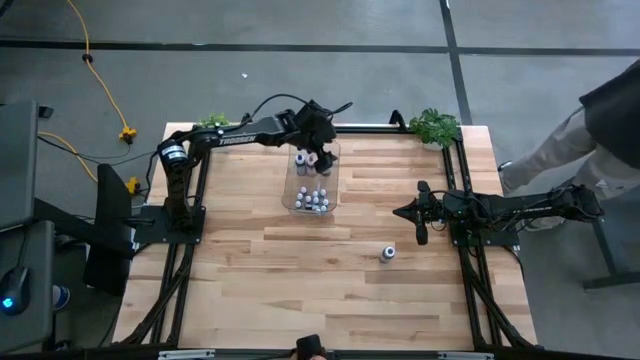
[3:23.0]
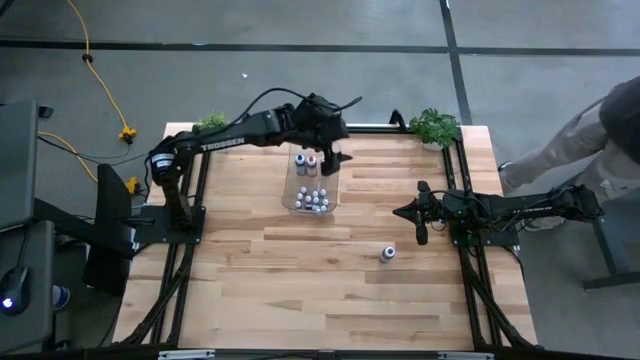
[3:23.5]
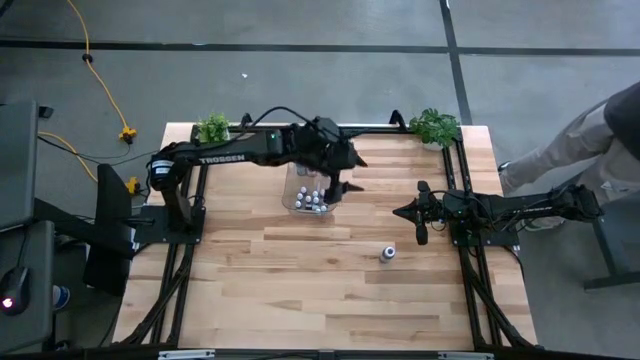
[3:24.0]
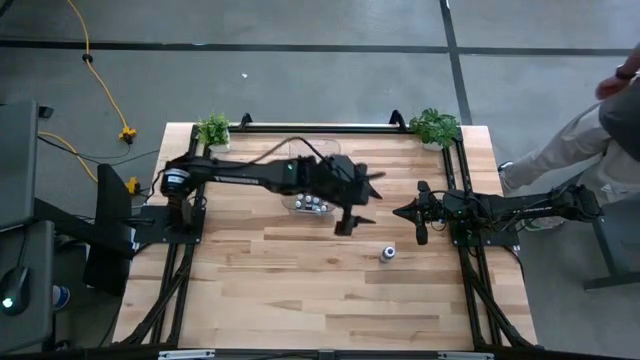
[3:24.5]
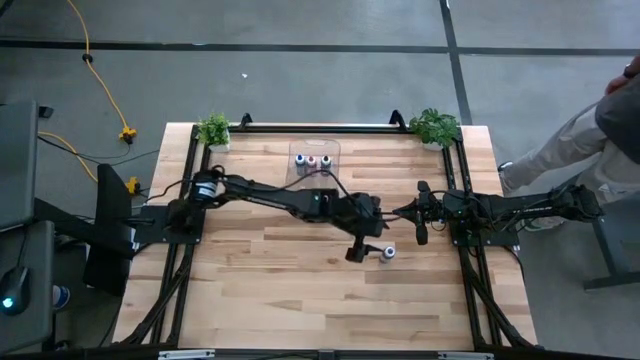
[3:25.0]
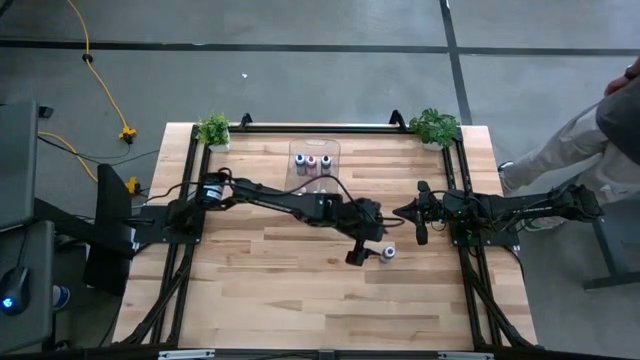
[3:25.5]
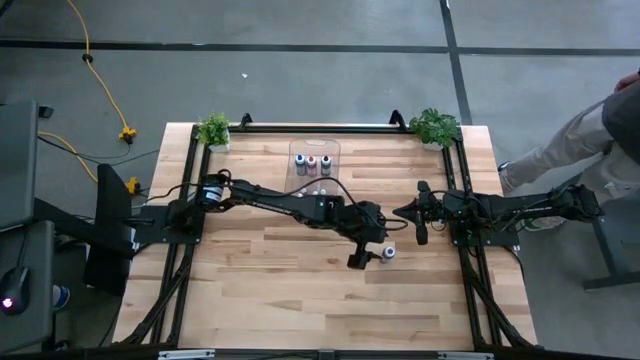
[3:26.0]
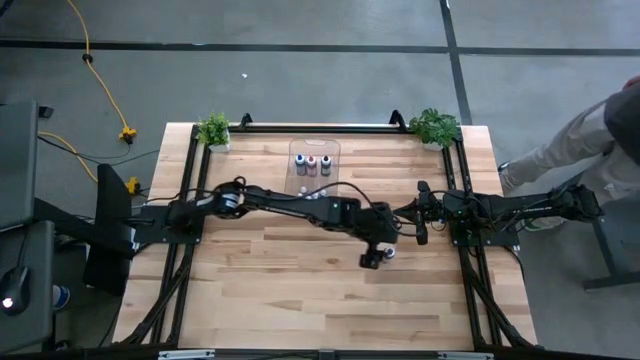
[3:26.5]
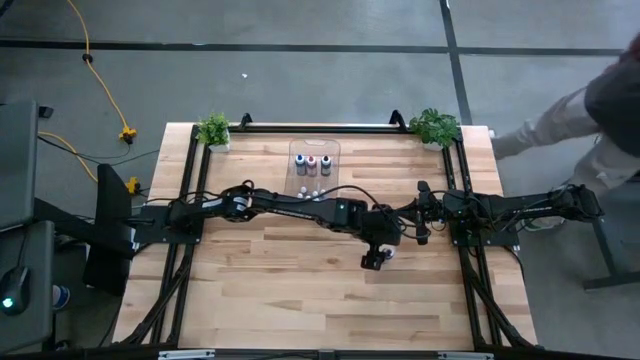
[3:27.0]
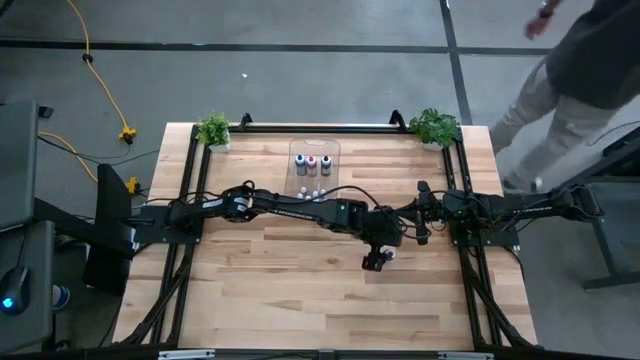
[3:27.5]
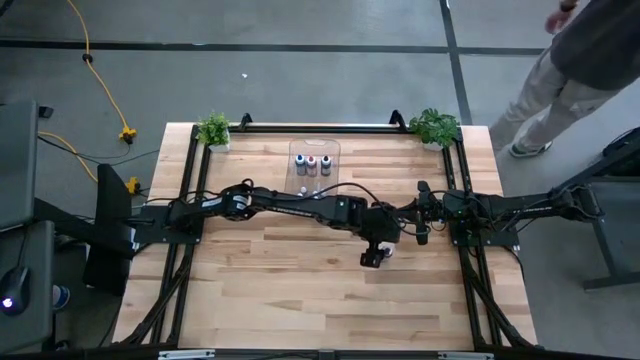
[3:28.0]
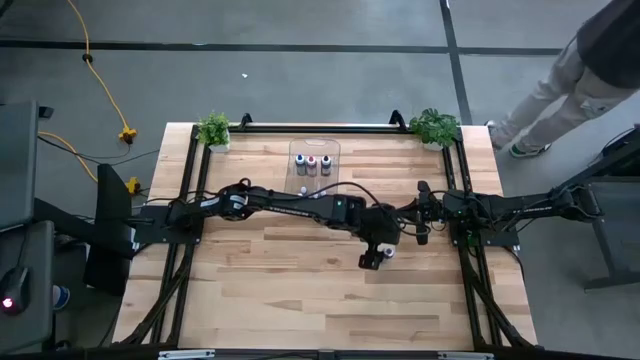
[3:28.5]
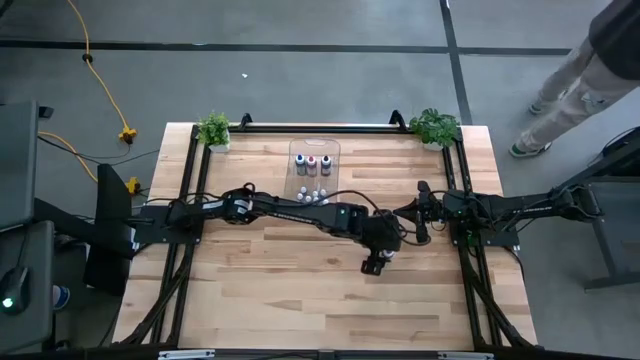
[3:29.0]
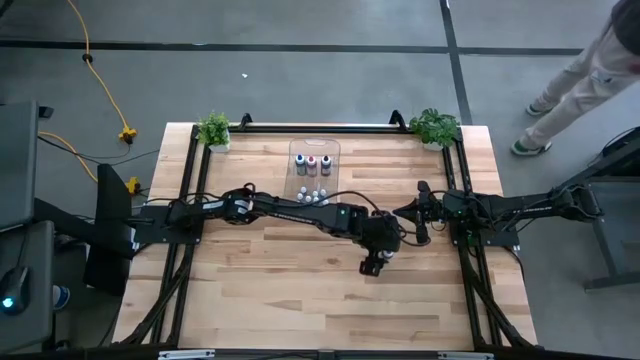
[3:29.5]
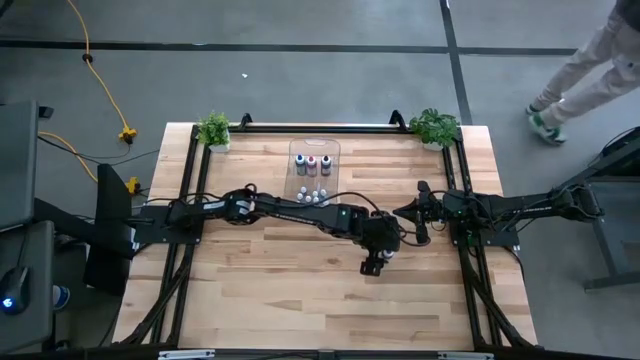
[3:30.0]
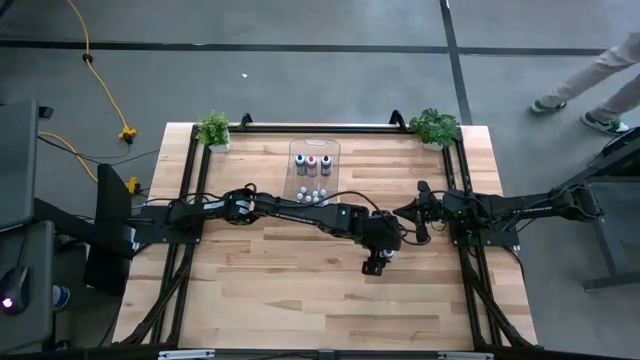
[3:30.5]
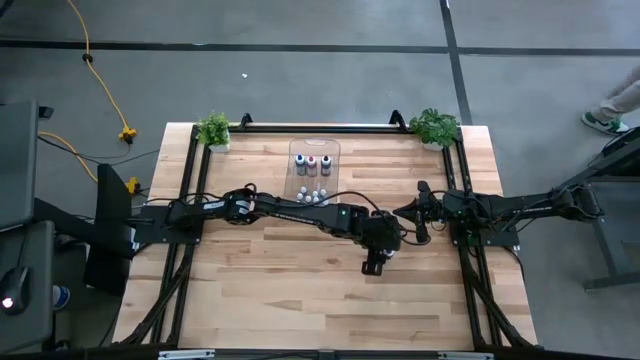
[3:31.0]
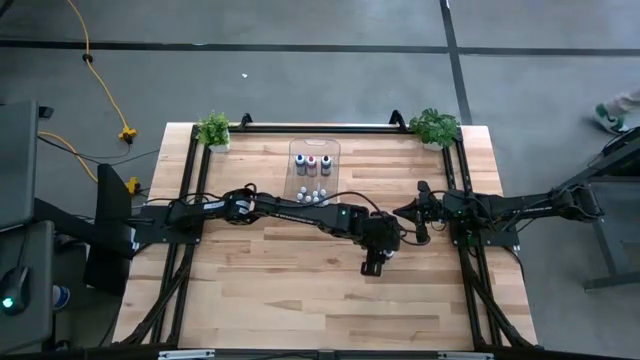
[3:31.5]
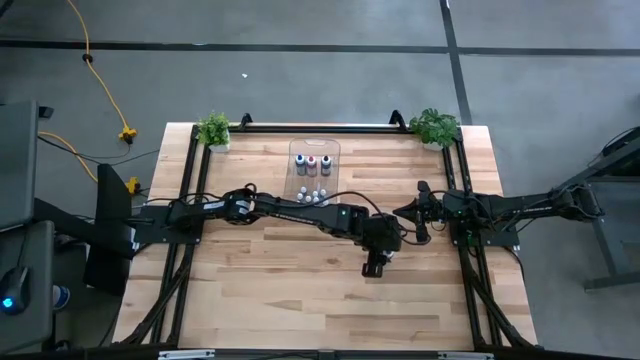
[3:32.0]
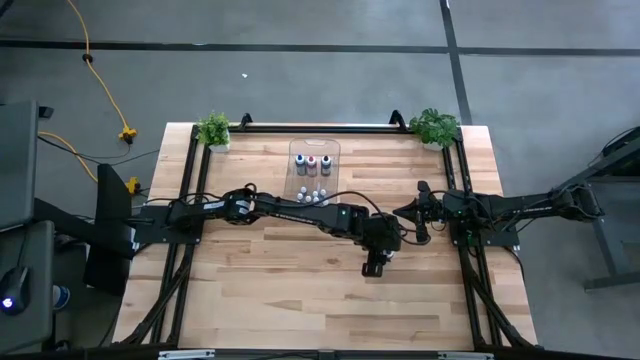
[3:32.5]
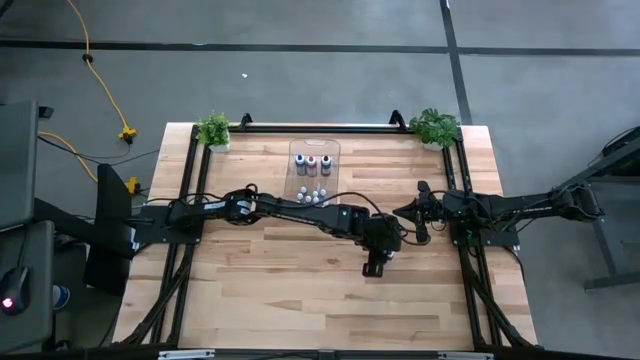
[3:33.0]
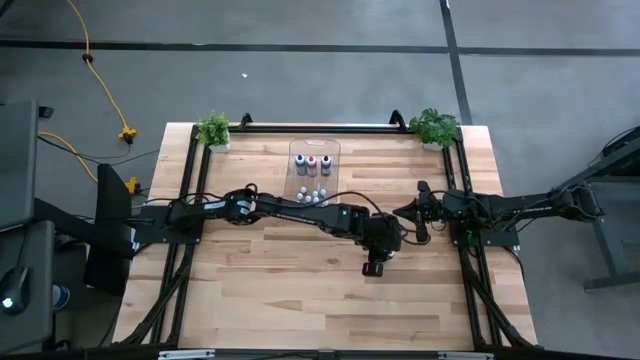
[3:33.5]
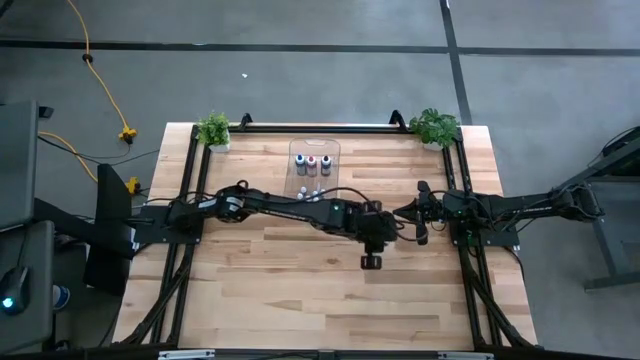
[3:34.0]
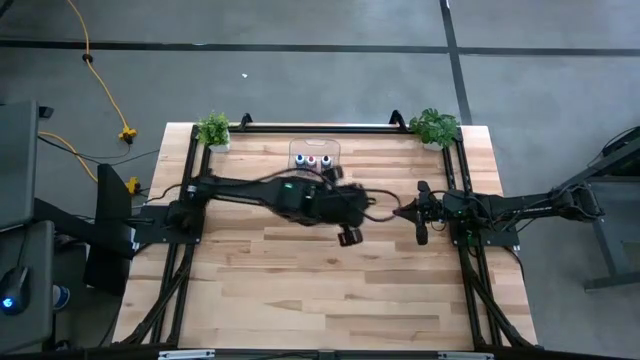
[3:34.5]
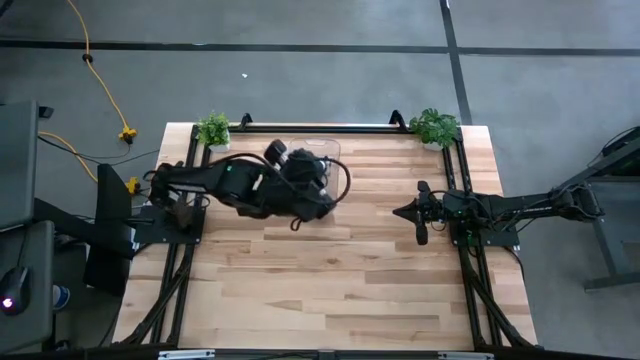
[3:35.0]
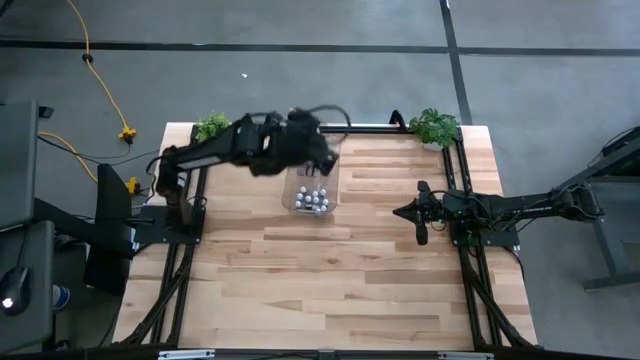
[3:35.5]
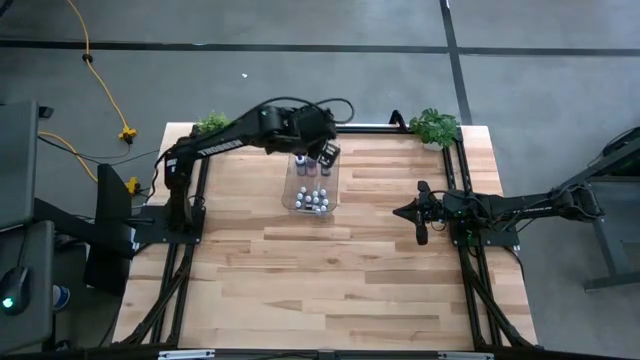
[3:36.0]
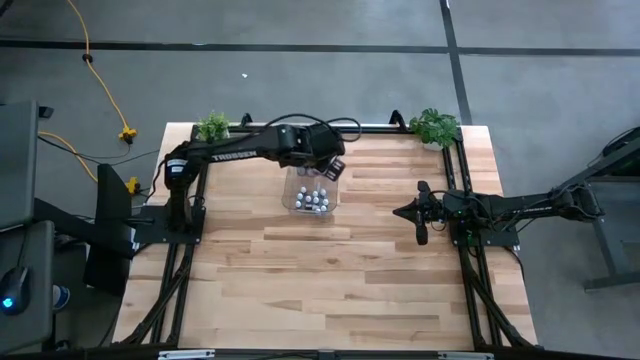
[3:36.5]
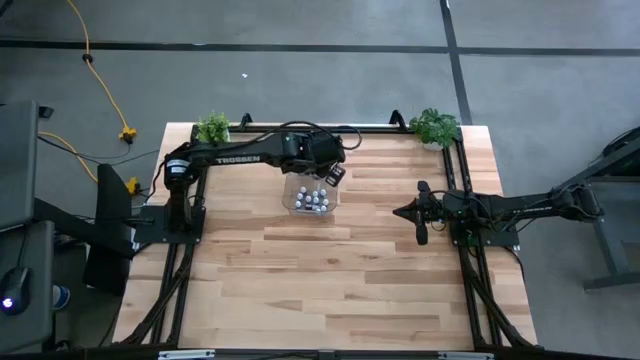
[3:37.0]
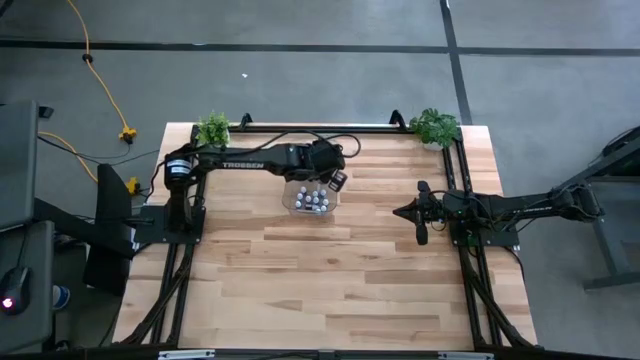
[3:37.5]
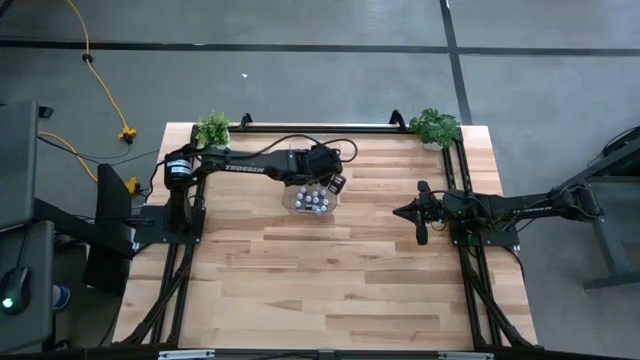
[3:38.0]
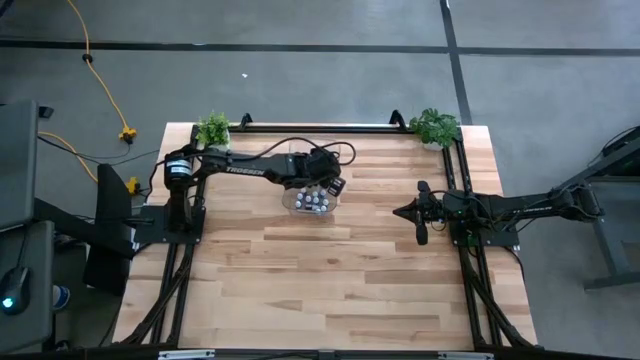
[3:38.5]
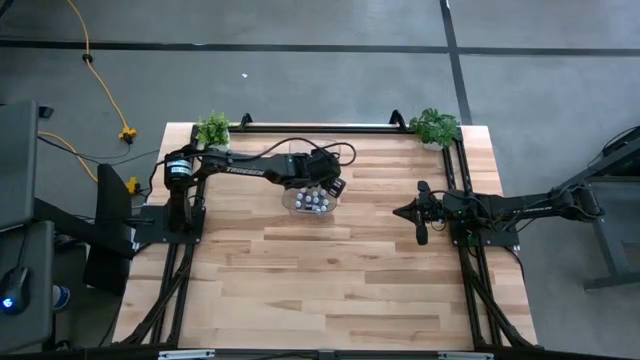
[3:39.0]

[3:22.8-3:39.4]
Task: Pick & Place food coloring
Put the large purple food coloring into the transparent bin

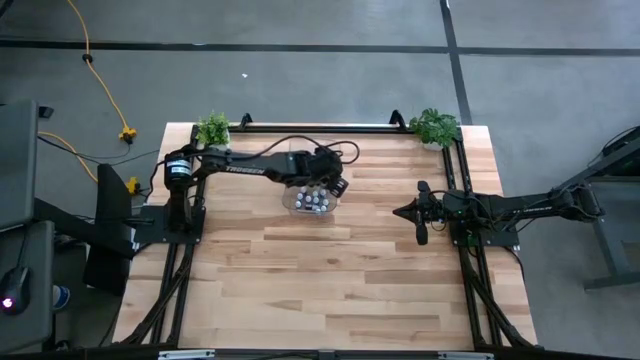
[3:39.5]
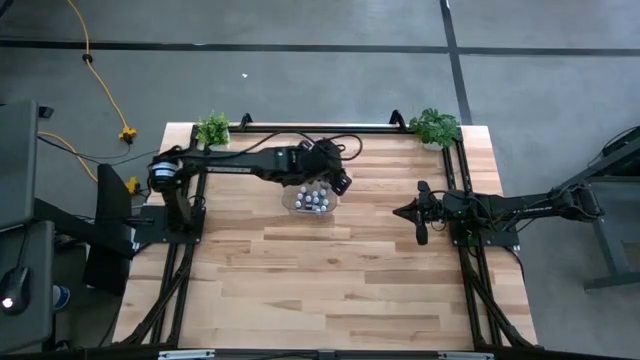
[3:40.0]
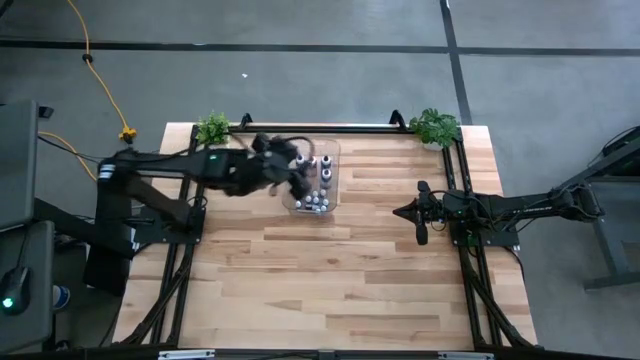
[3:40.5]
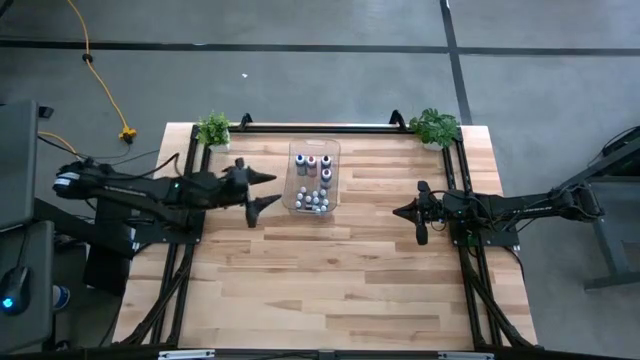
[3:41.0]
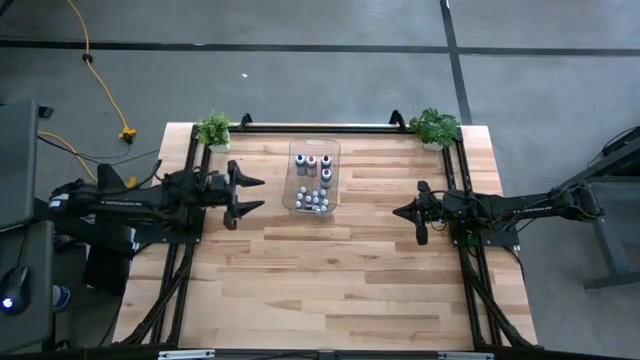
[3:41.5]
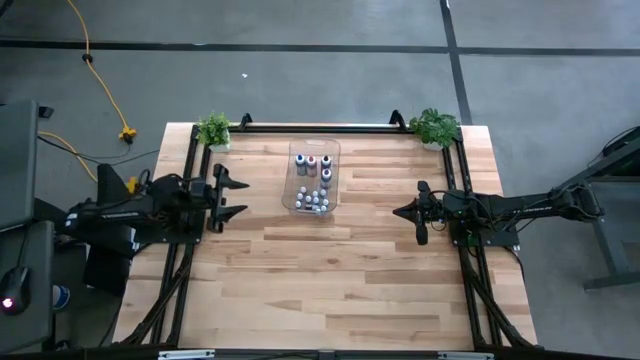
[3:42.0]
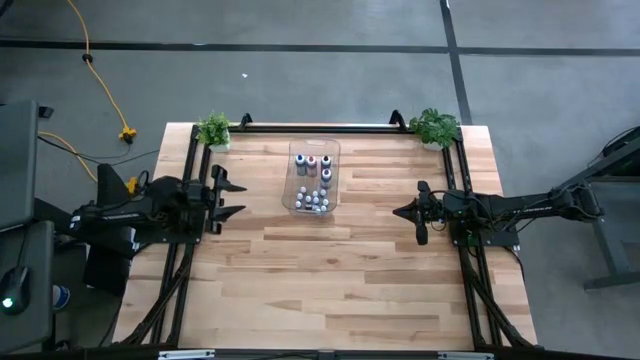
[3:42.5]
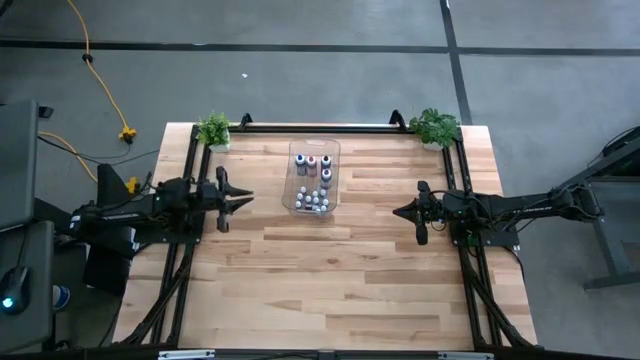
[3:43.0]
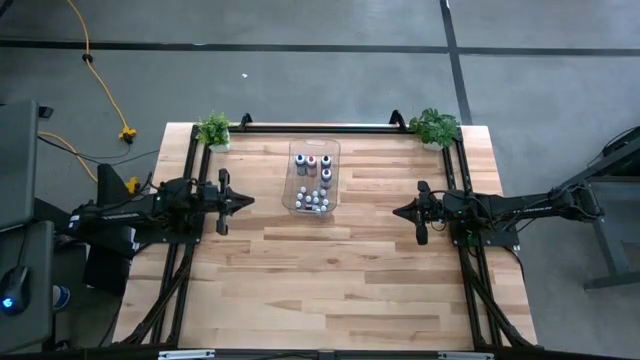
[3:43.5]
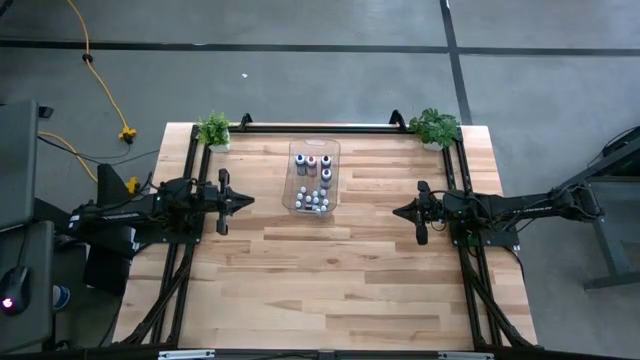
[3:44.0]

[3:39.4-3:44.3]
Return to Home Position
